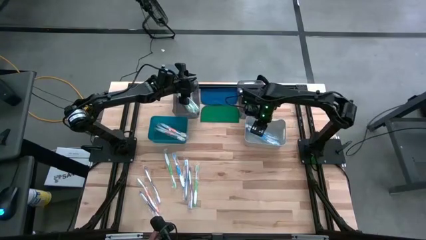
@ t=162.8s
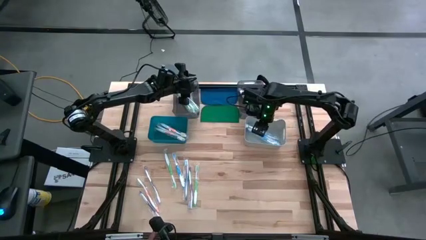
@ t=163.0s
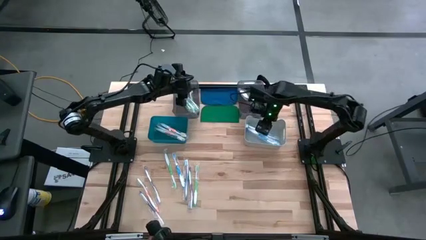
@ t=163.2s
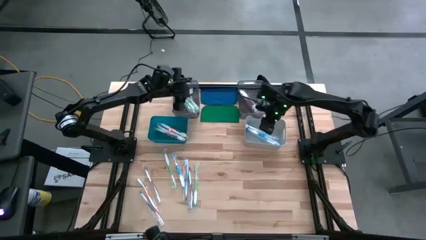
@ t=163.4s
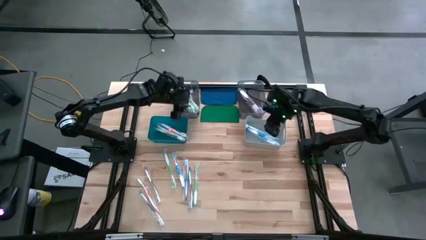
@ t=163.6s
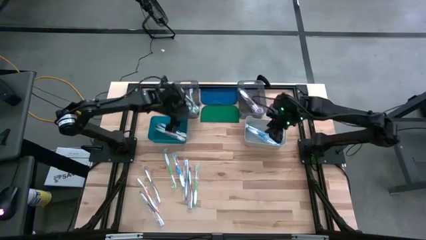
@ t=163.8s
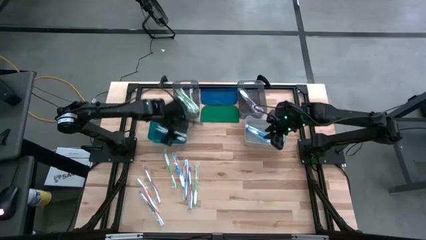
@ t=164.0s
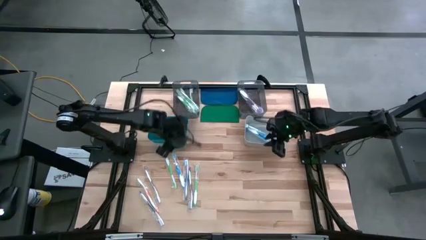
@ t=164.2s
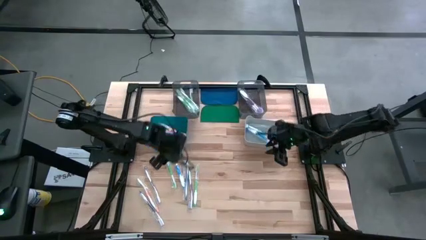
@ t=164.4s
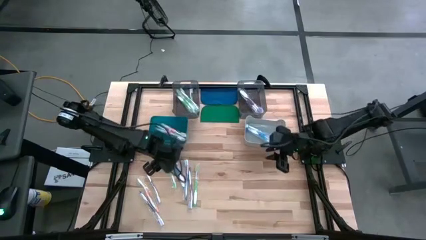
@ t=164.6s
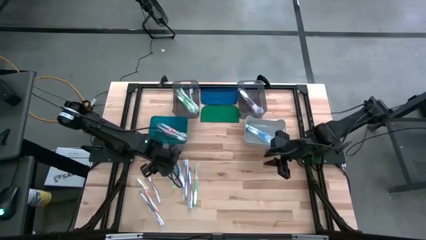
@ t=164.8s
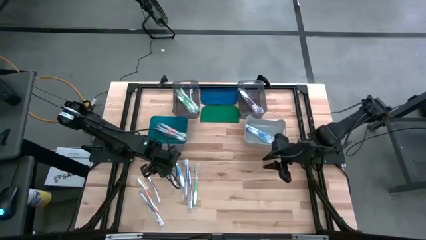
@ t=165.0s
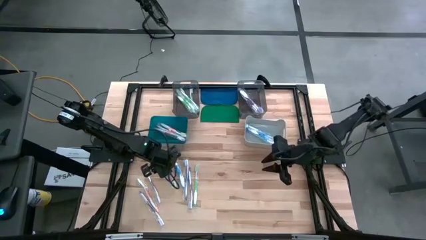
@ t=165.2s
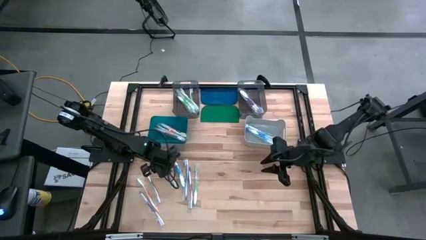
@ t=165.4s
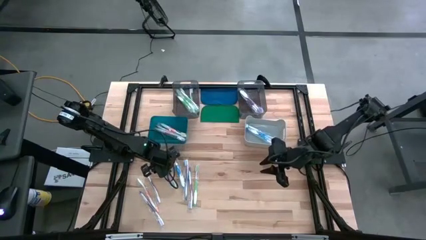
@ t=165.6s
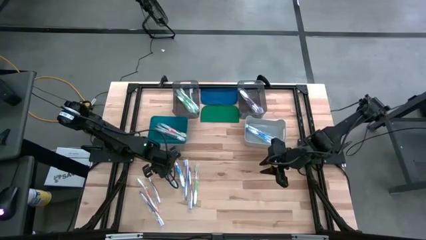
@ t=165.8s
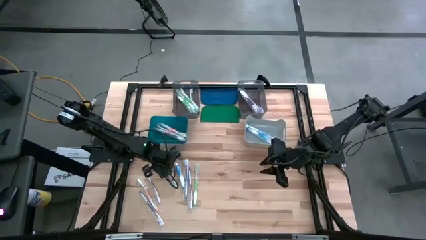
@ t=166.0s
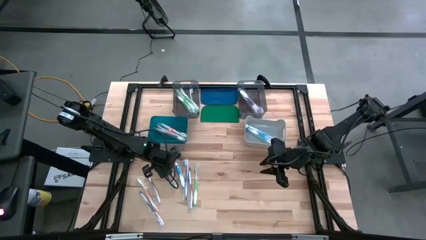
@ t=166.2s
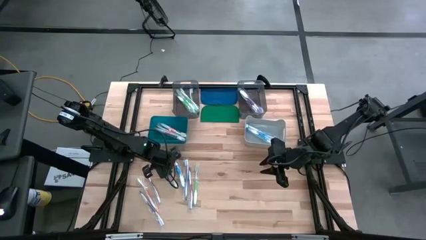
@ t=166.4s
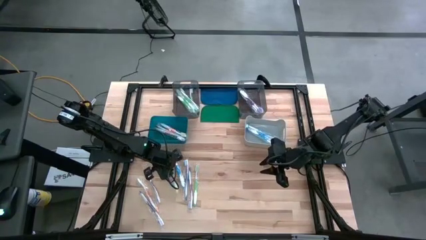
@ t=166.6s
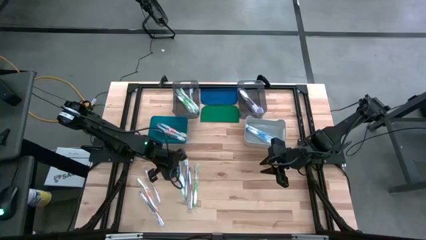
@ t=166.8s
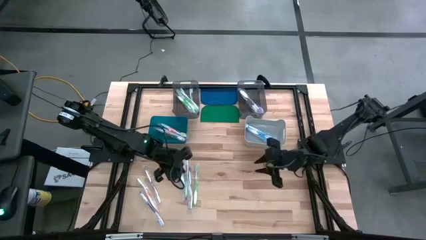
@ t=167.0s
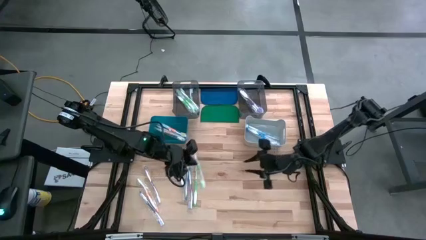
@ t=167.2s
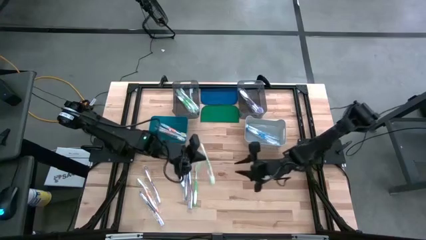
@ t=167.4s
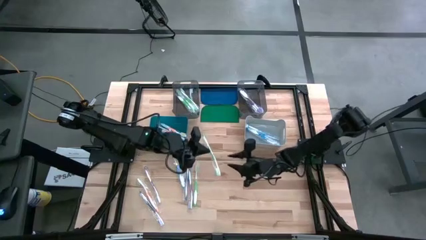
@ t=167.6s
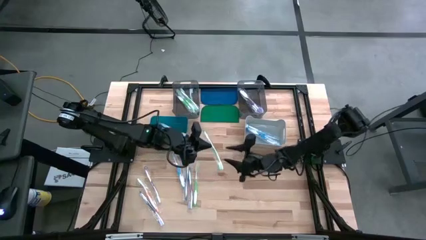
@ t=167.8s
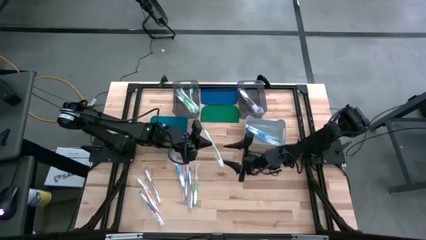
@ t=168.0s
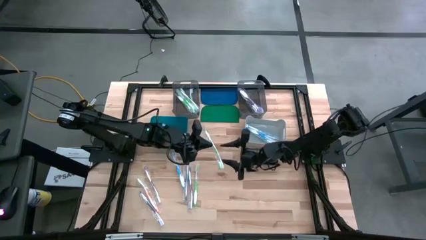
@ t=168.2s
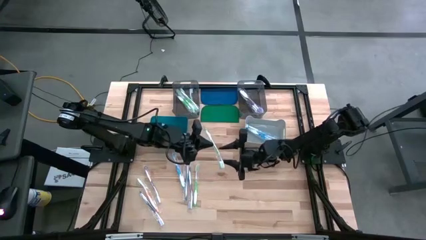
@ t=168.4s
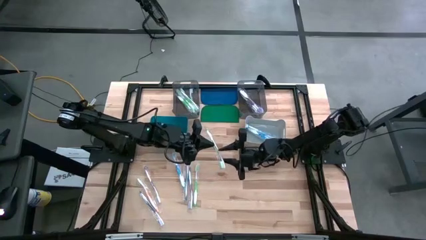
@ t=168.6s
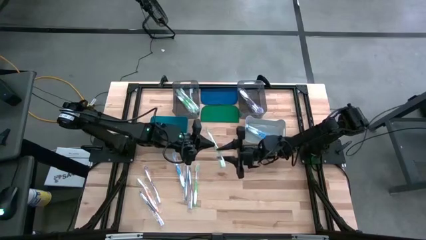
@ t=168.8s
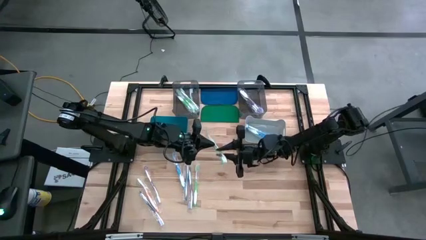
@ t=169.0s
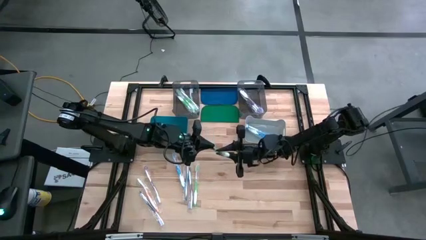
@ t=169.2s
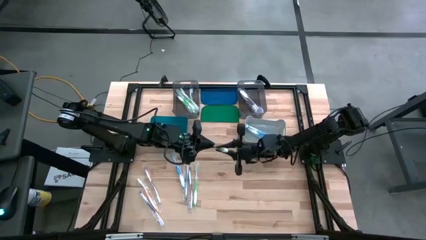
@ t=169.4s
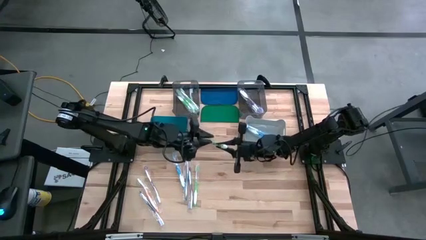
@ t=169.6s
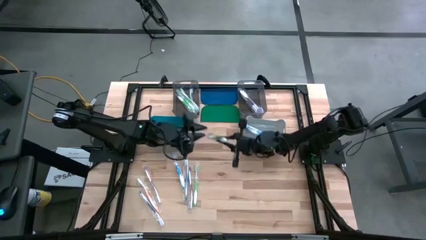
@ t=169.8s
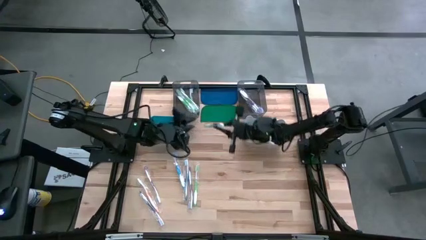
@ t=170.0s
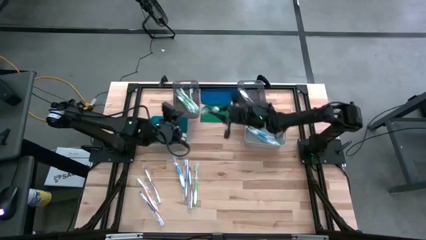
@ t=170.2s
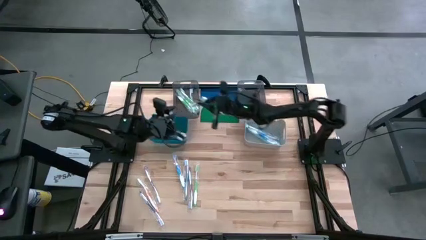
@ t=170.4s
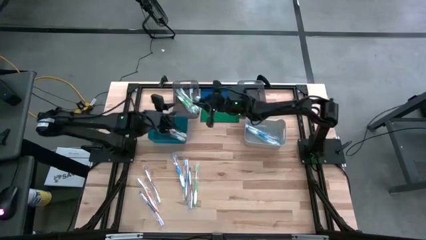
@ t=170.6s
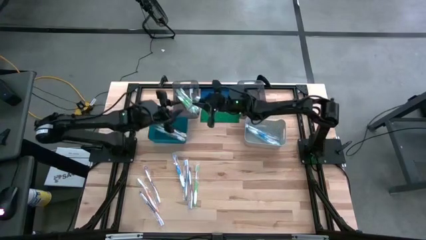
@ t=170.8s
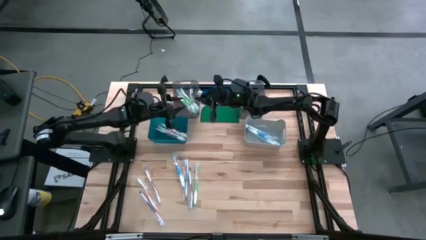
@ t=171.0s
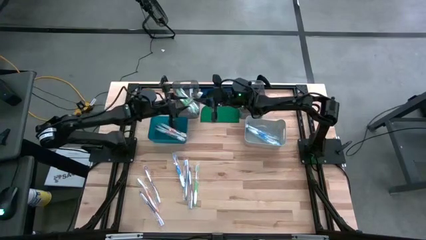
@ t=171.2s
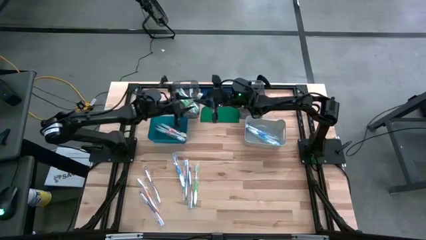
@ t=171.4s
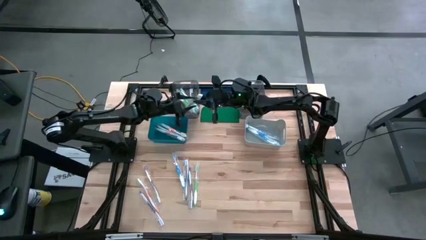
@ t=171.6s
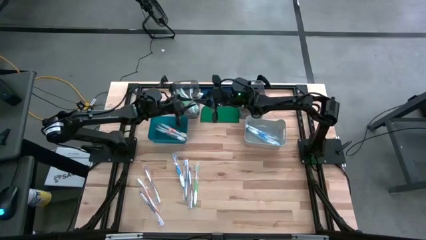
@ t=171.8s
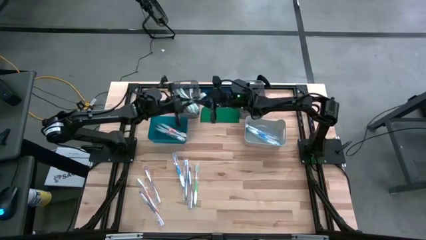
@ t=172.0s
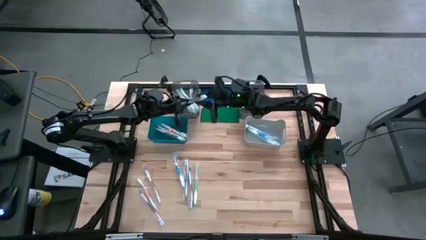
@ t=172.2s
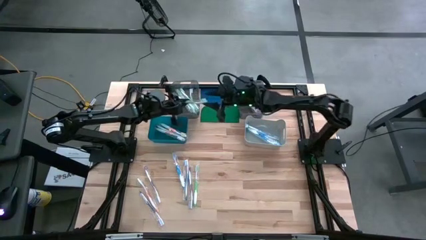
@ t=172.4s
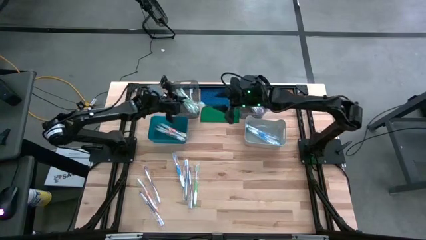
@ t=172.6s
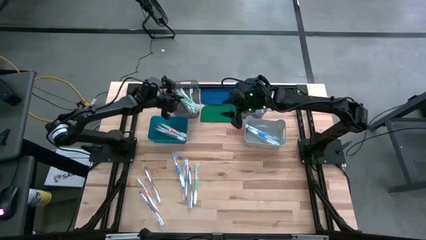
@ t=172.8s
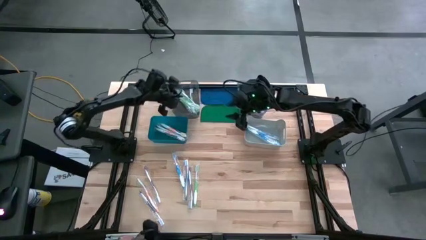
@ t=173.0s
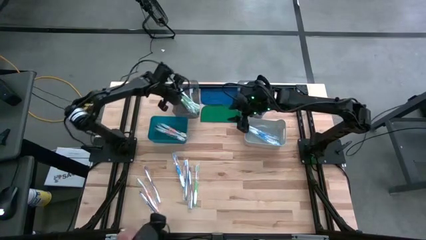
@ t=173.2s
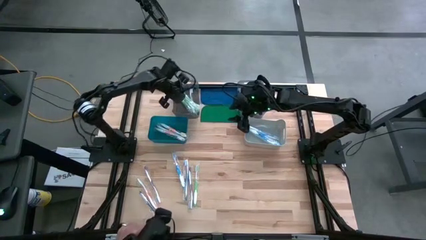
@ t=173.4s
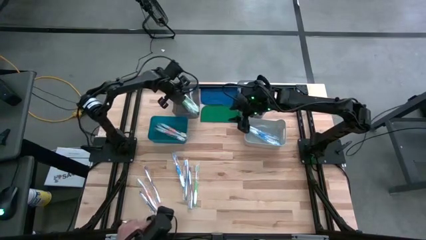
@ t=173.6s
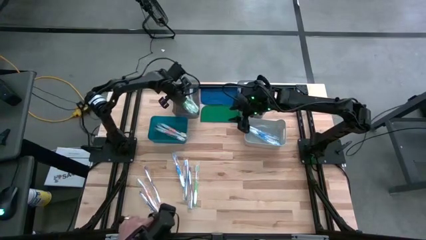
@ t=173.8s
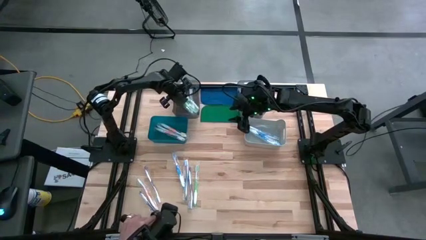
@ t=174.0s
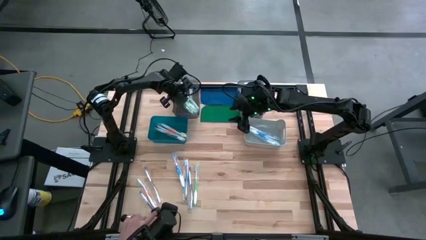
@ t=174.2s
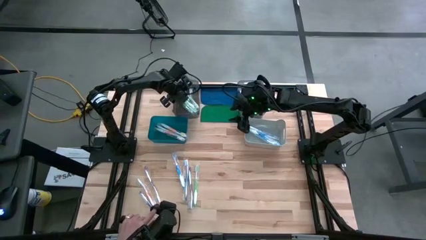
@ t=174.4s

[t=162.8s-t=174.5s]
Task: Pick & Place Toothbrushes
Put the green toothbrush into the left black bin

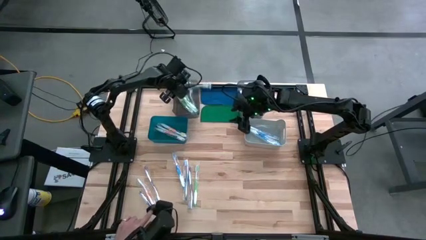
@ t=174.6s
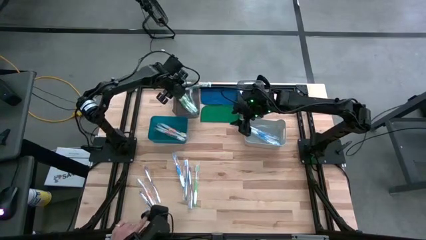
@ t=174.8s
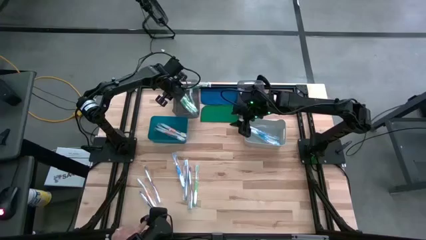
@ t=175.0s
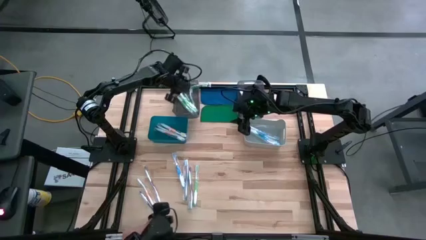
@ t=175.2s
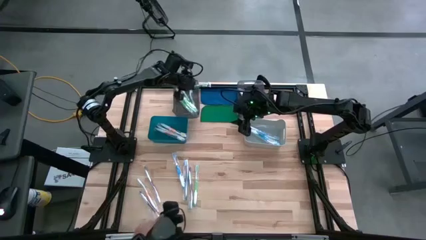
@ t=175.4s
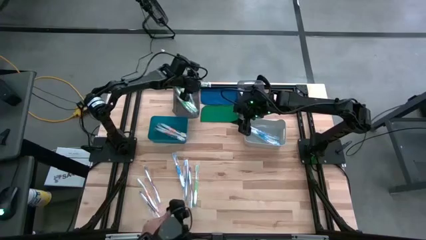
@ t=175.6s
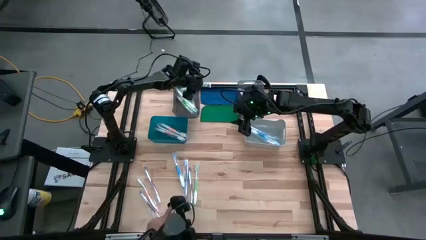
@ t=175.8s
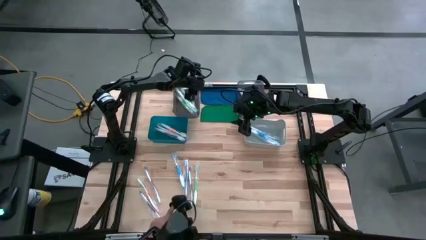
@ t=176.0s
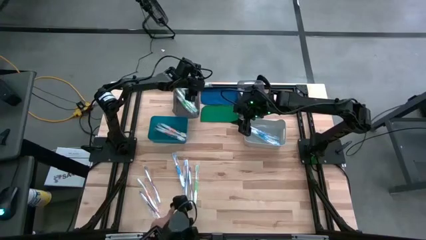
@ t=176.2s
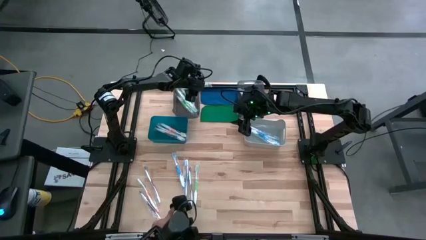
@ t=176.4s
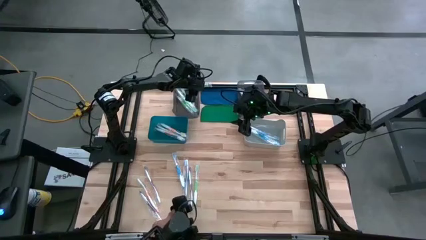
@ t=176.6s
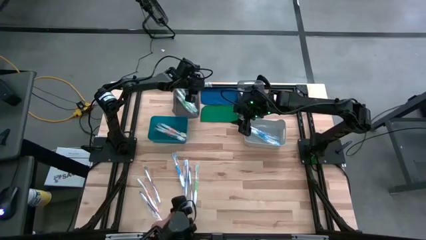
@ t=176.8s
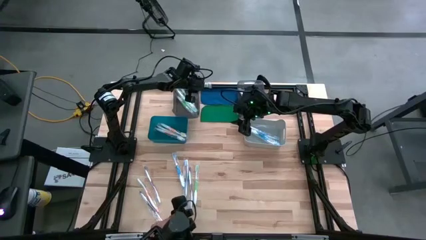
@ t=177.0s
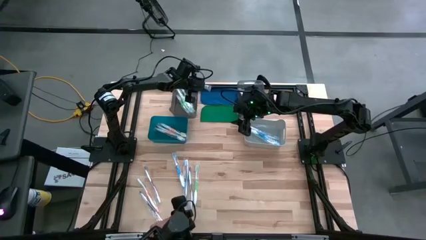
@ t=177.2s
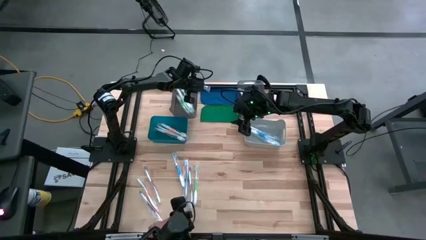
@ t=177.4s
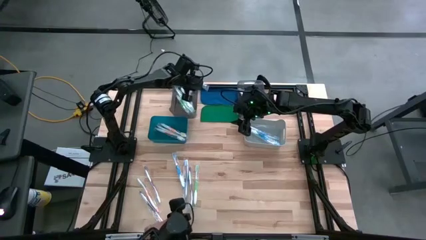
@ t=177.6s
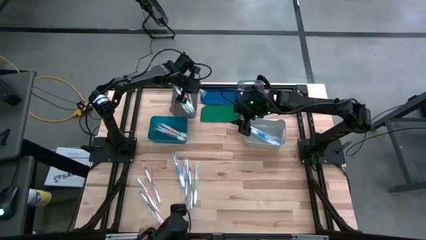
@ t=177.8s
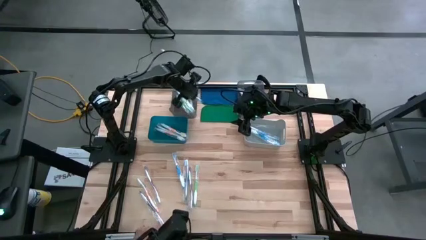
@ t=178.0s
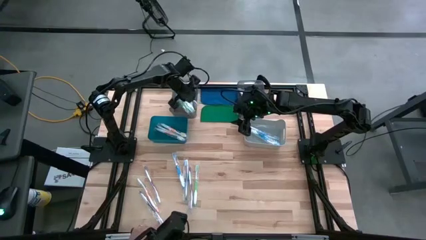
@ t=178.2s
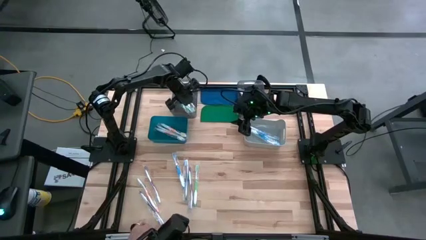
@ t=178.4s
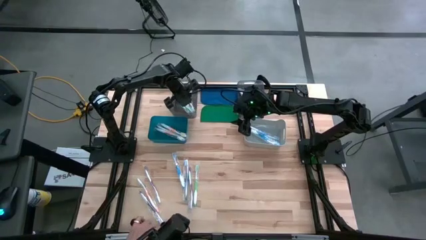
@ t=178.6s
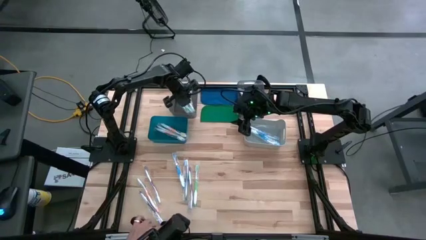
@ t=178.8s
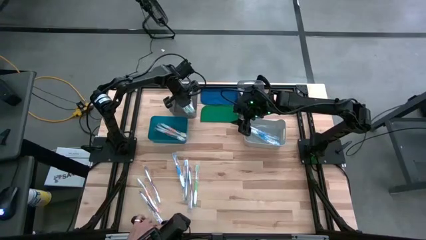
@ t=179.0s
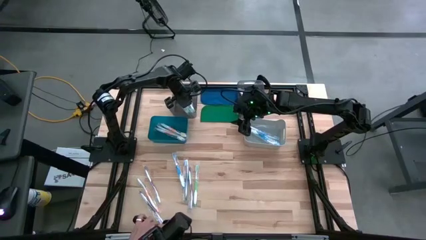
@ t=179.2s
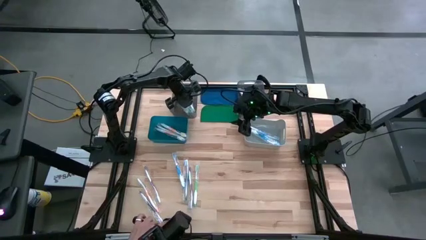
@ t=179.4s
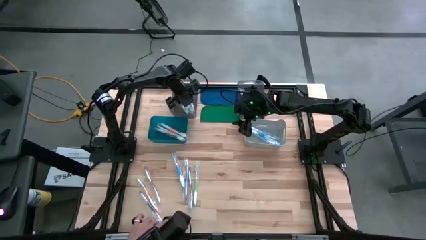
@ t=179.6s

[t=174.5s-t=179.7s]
Adjust the green toothbrush in the left black bin
